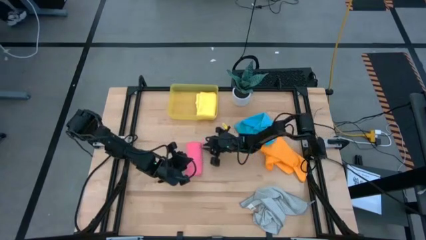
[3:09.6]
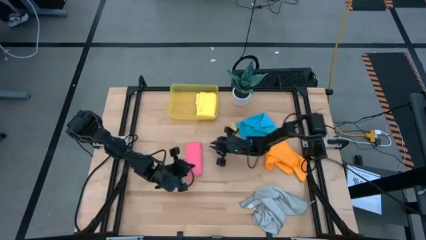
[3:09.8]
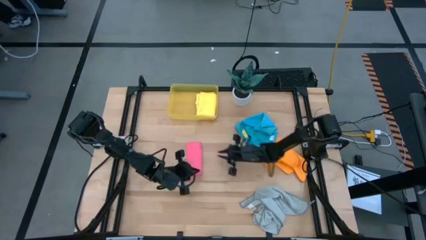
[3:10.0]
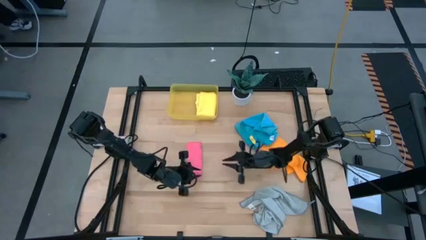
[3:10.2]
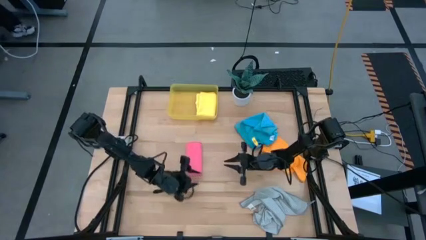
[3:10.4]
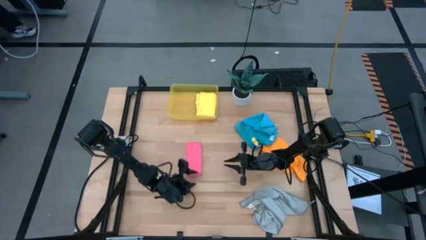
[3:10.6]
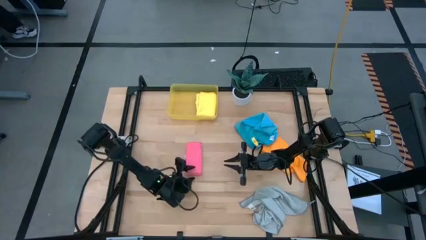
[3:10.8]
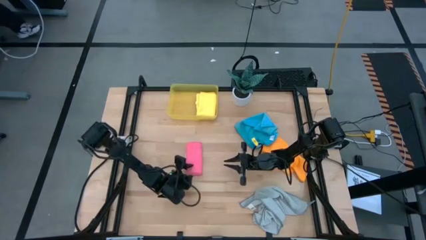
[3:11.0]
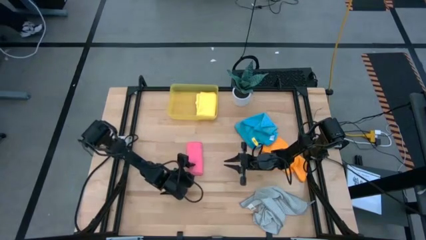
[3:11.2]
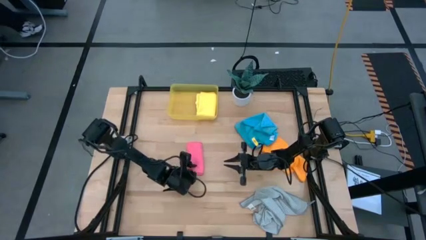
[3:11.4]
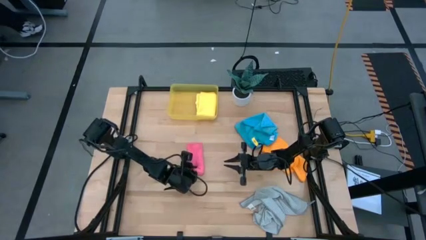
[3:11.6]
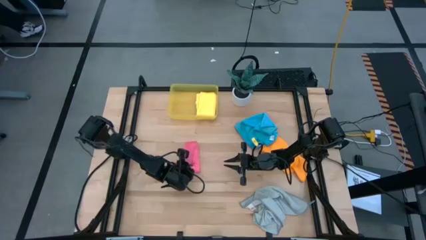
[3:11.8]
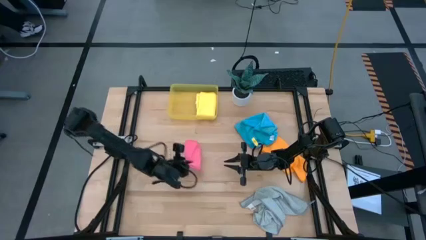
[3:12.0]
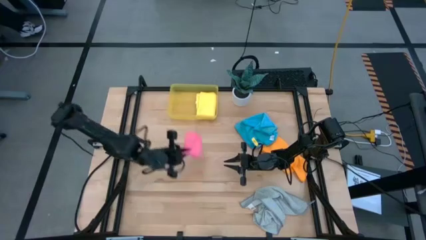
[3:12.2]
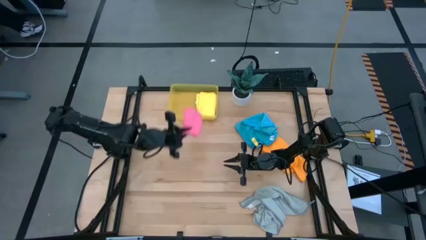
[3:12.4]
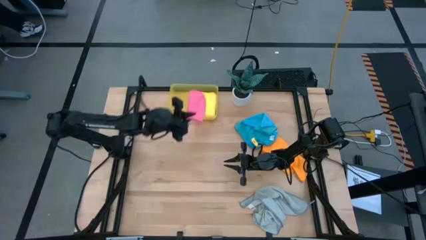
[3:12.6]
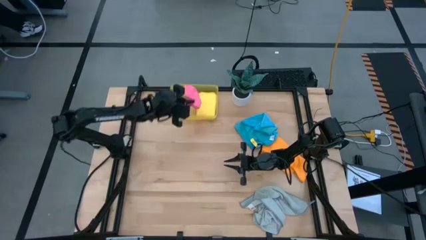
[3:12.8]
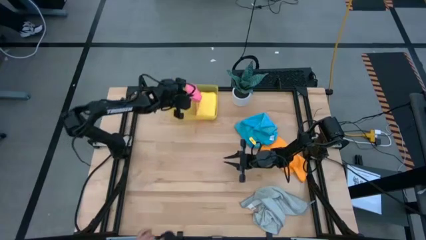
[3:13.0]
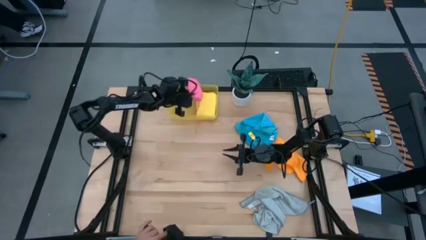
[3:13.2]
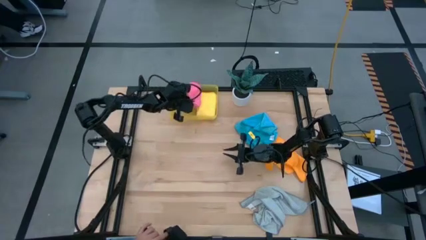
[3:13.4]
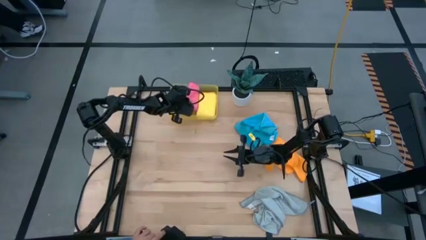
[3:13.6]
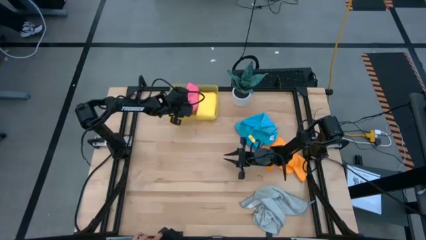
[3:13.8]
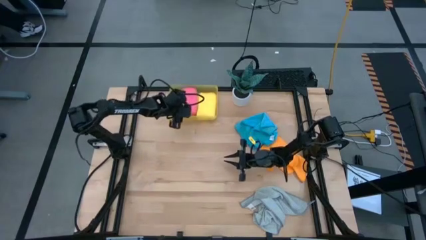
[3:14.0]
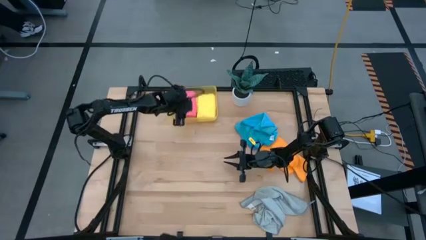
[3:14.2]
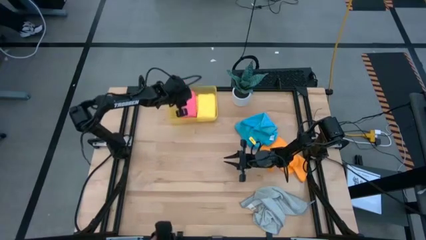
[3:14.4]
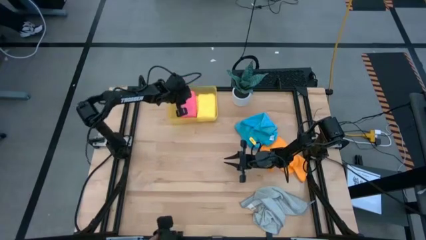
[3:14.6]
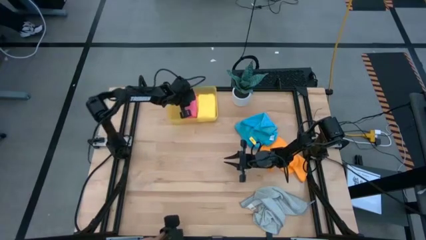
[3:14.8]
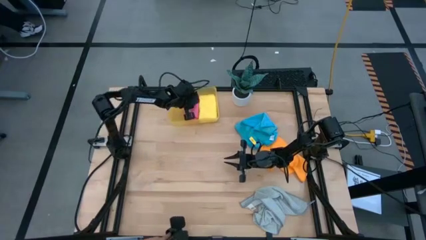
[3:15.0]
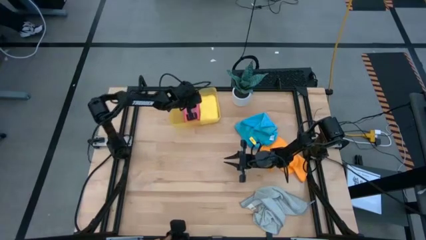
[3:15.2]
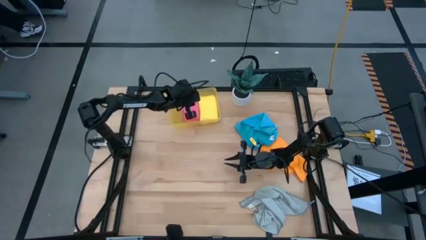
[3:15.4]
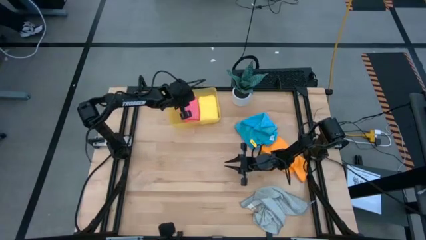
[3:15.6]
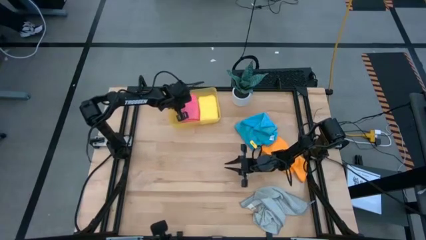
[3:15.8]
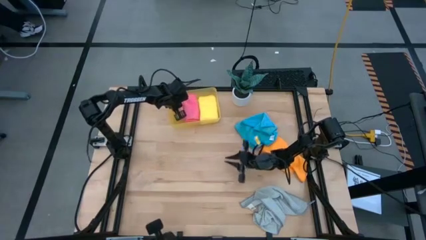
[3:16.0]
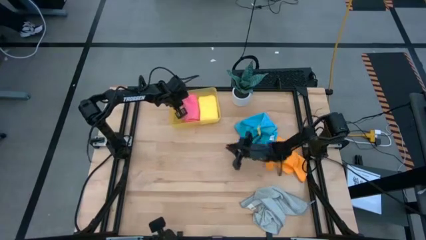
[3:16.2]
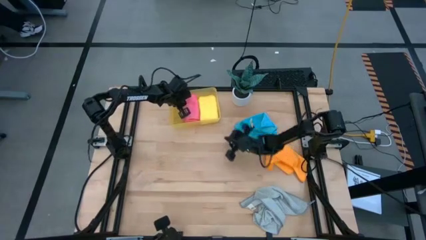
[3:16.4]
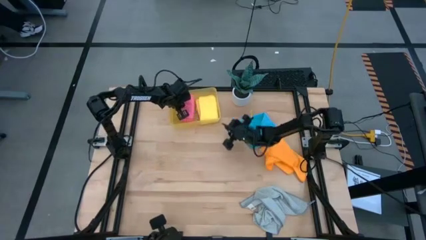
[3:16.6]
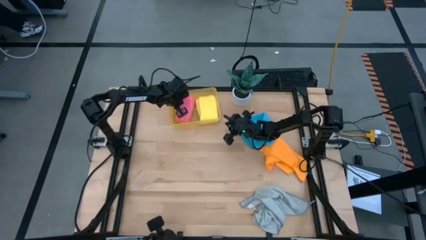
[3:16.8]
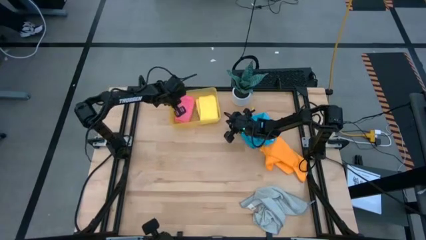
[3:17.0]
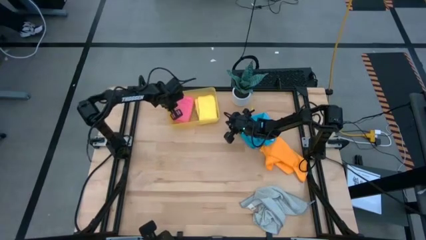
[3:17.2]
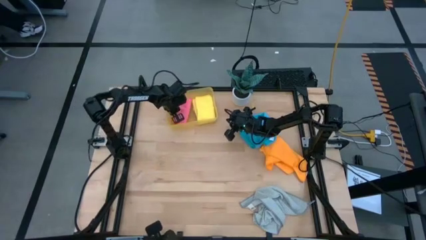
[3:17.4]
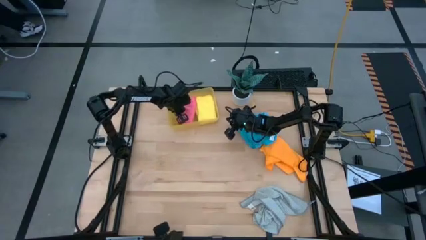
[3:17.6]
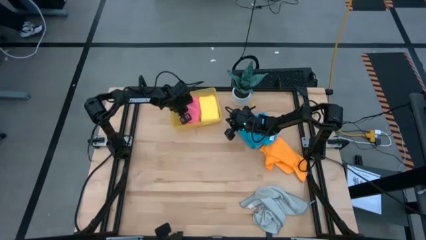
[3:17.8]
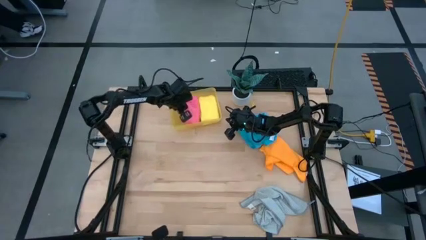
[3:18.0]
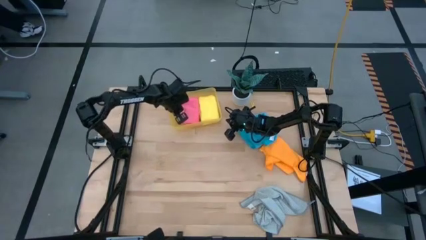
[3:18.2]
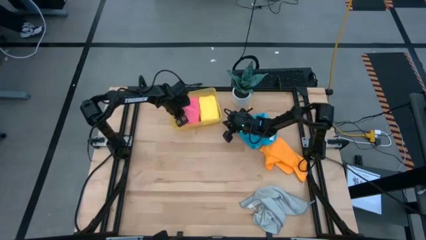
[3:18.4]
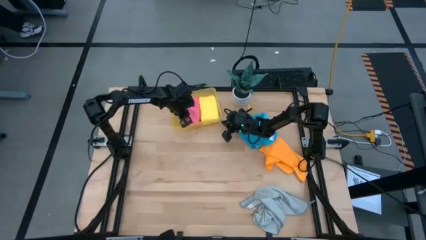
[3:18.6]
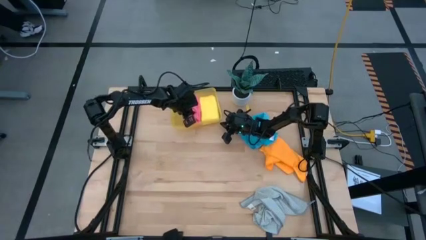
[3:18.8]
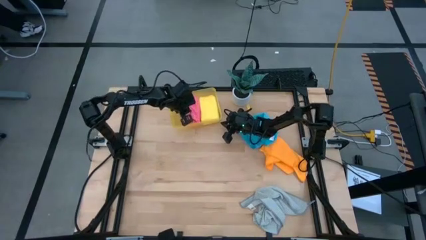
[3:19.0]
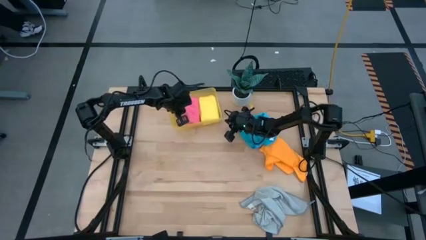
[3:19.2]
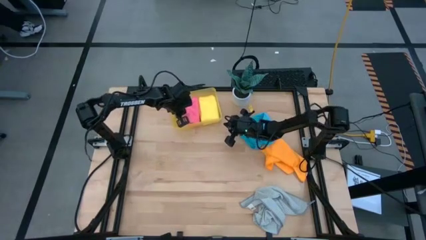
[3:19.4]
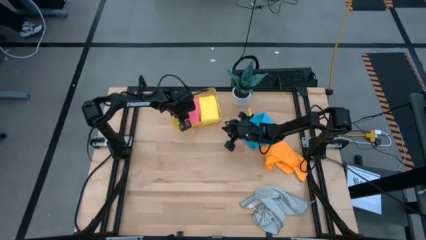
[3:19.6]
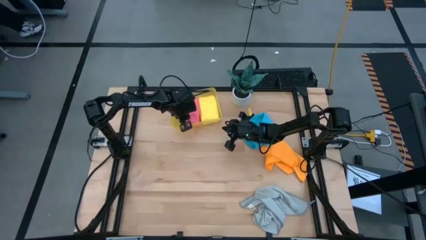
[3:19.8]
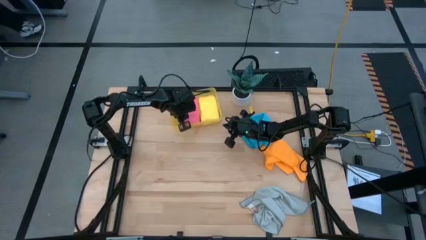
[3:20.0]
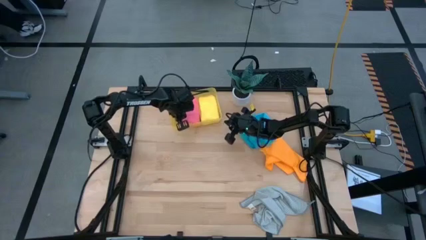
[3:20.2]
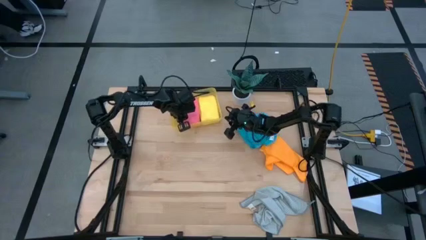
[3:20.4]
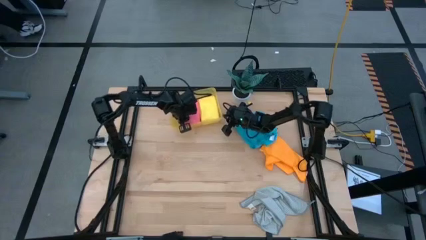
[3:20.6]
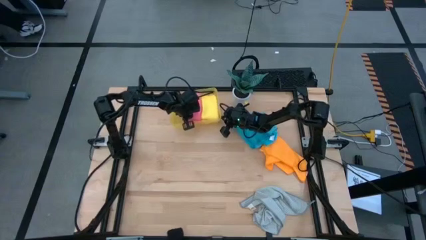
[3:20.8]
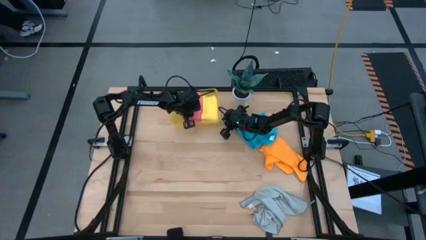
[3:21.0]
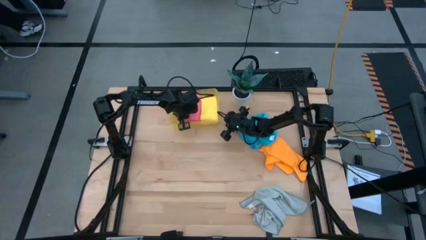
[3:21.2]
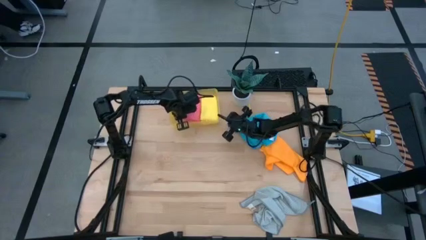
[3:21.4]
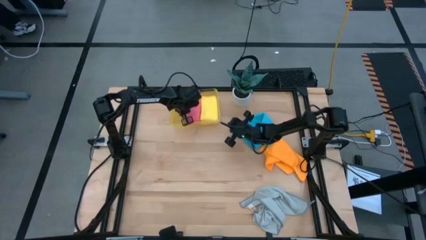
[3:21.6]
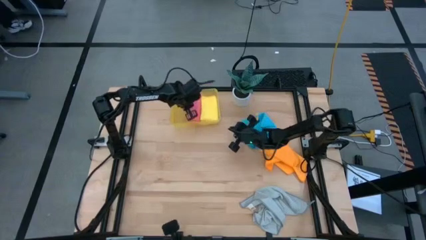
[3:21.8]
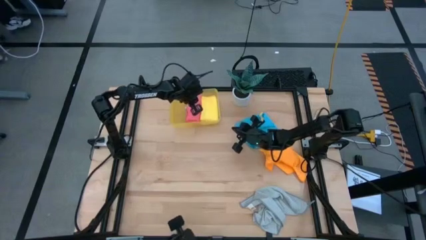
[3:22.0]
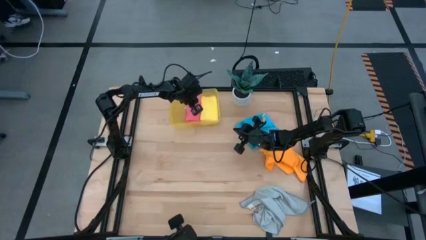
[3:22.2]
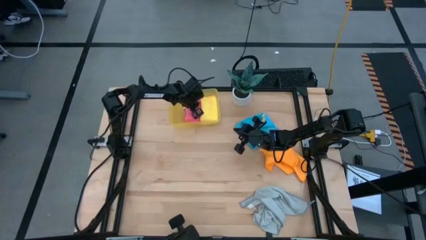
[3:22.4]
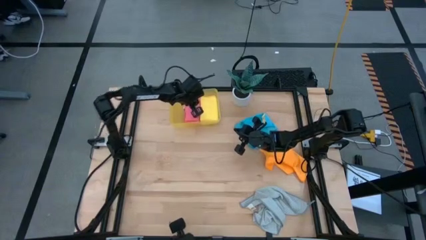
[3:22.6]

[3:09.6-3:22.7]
Task: Fold microfiber towels
Put the pink microfiber cloth into the yellow bin

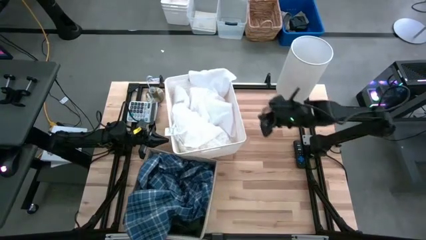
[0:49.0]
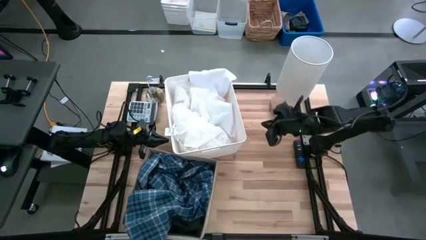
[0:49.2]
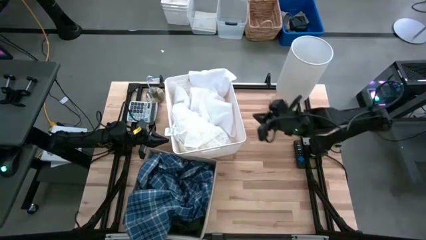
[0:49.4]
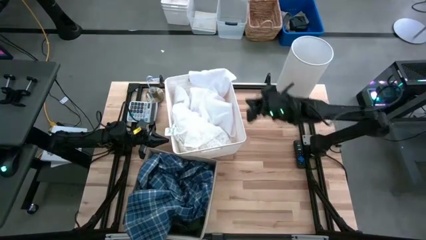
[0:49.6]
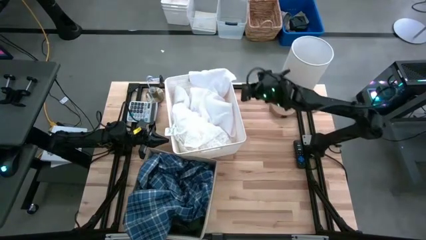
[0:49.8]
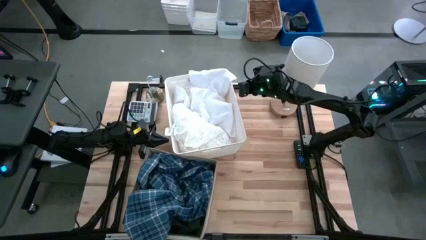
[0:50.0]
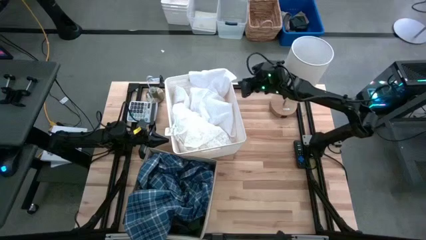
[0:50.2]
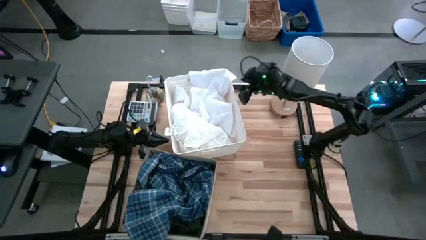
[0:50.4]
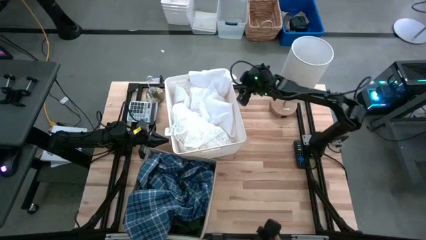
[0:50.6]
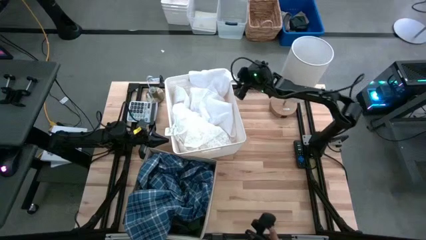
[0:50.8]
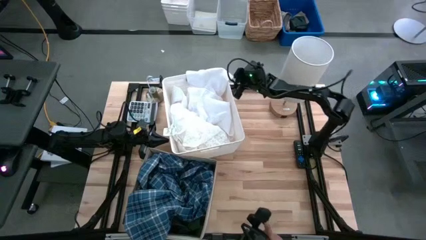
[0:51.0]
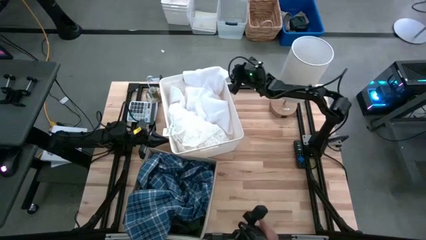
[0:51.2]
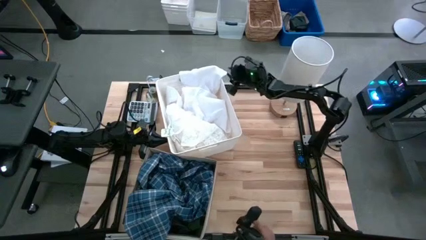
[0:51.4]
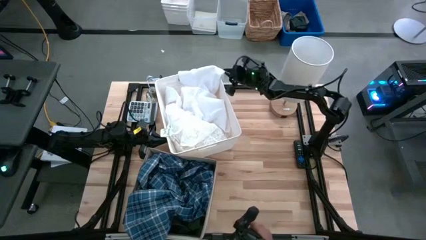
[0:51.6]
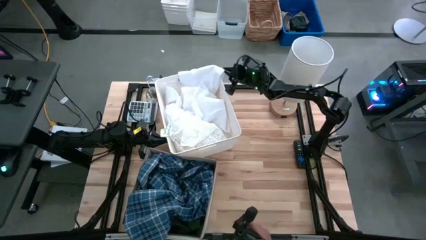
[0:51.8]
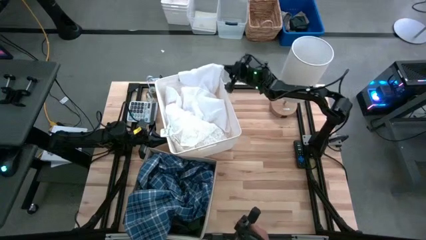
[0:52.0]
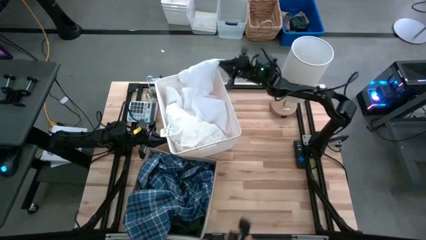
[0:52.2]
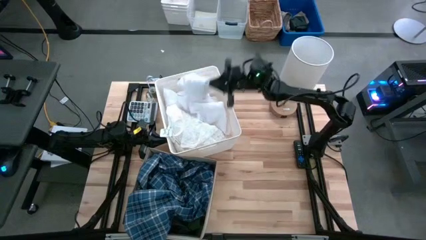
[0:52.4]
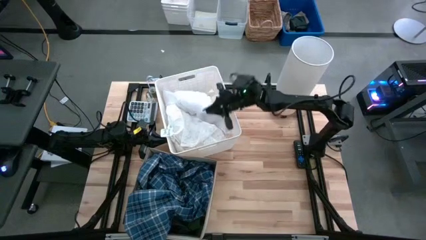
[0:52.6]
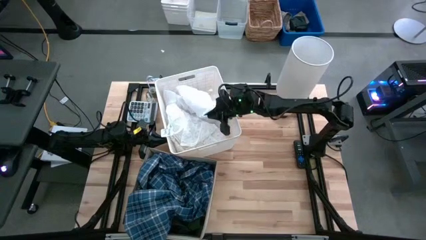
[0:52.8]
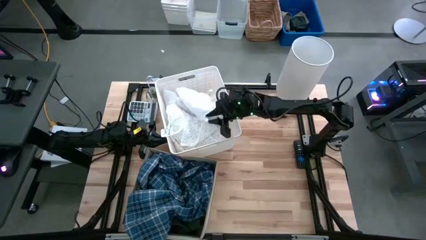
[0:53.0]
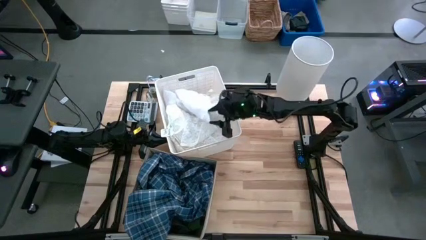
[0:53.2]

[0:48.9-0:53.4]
Task: Sort clothes
Adjust the white bin
